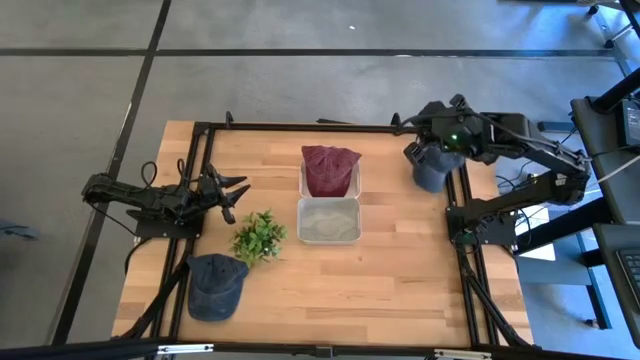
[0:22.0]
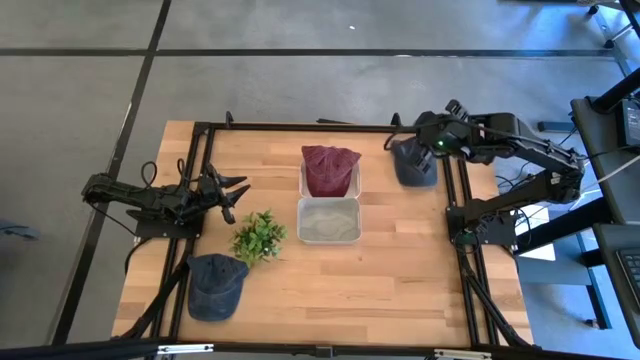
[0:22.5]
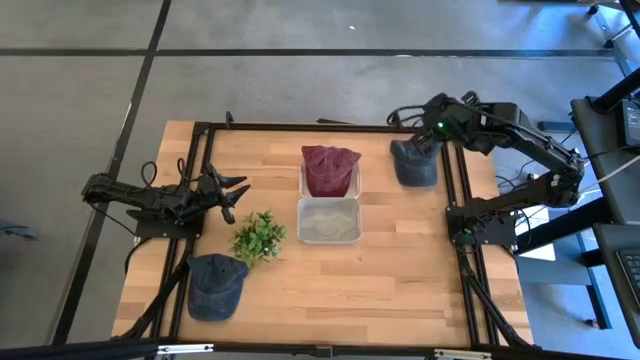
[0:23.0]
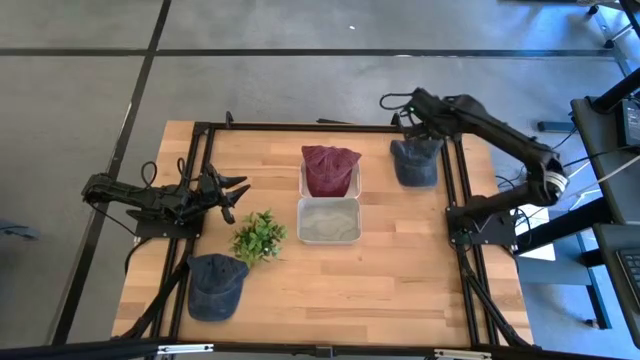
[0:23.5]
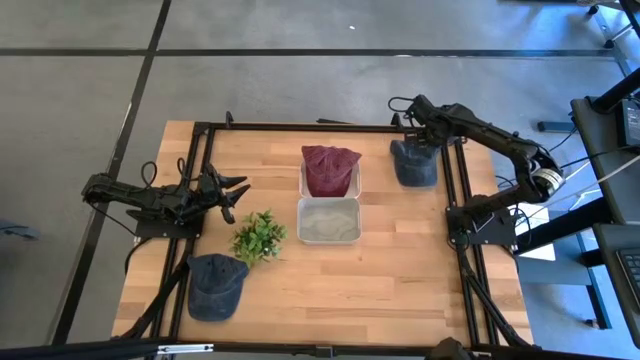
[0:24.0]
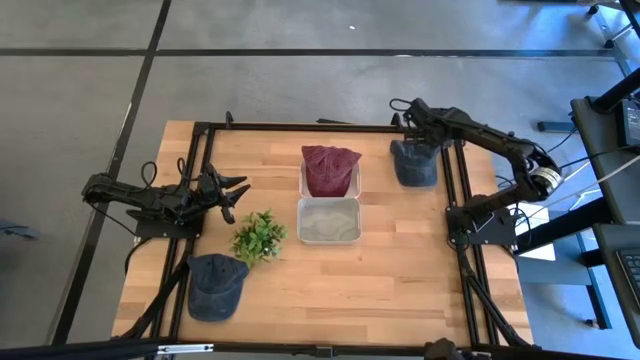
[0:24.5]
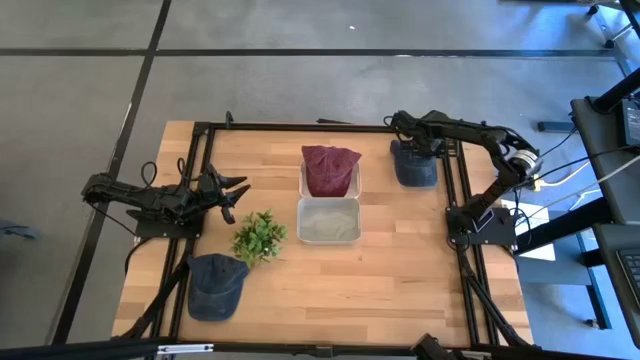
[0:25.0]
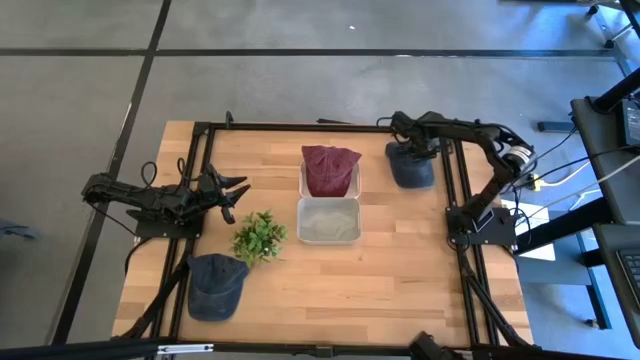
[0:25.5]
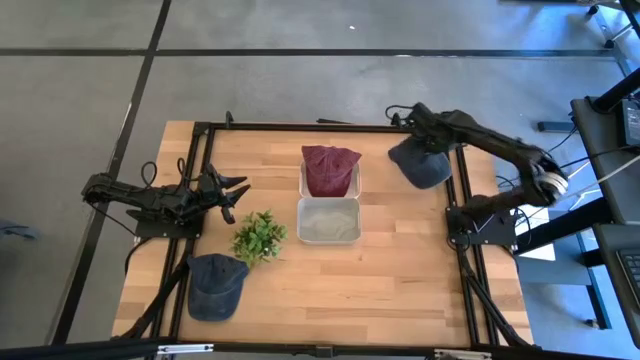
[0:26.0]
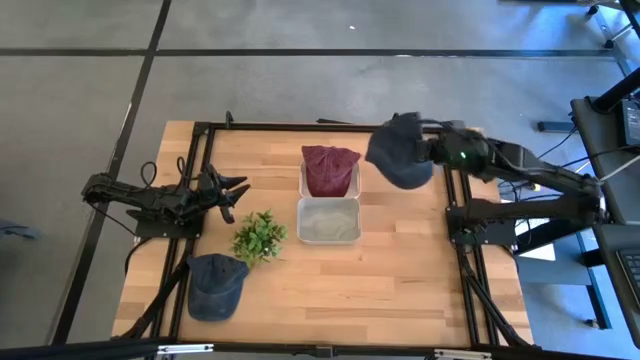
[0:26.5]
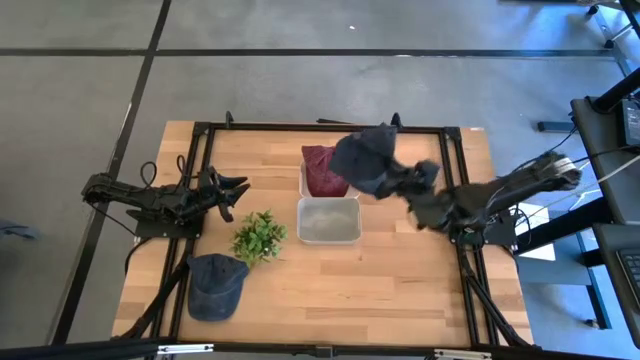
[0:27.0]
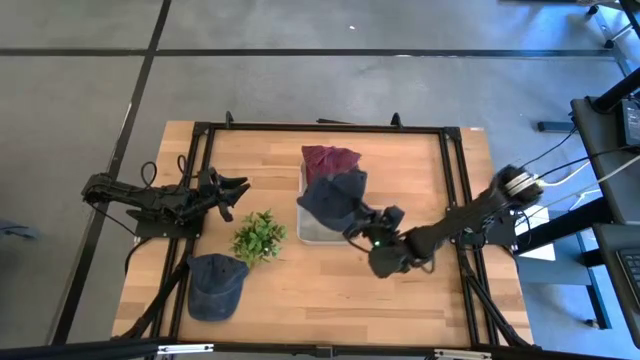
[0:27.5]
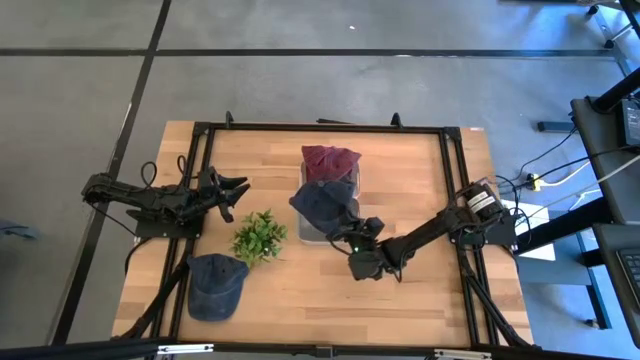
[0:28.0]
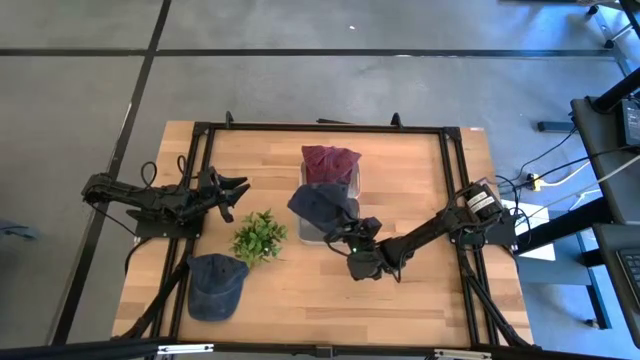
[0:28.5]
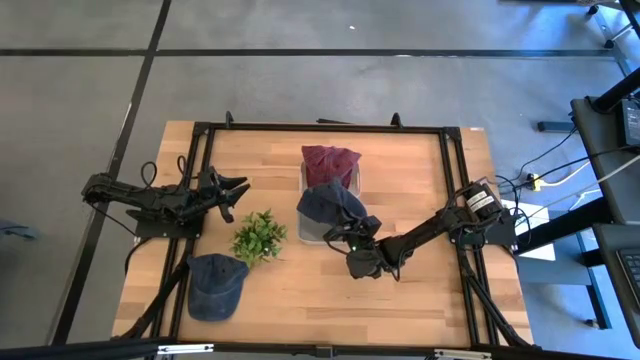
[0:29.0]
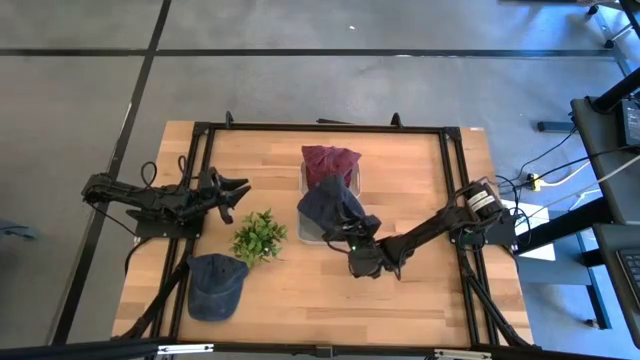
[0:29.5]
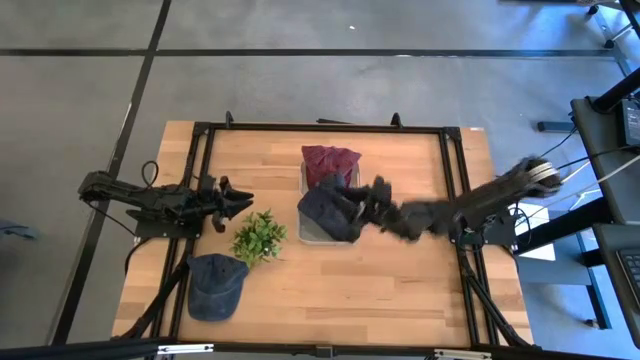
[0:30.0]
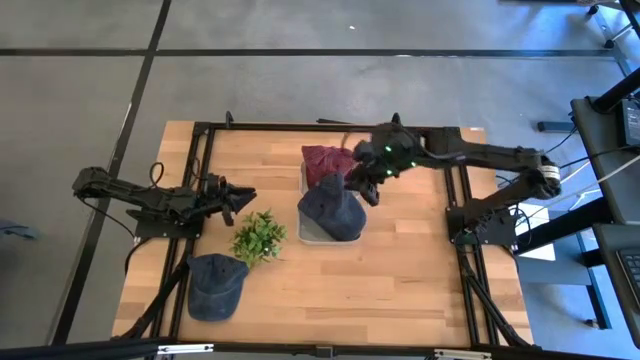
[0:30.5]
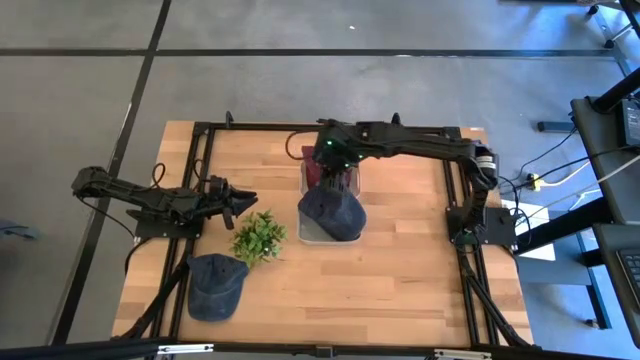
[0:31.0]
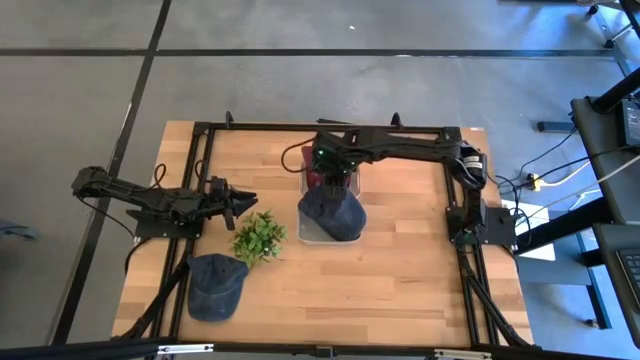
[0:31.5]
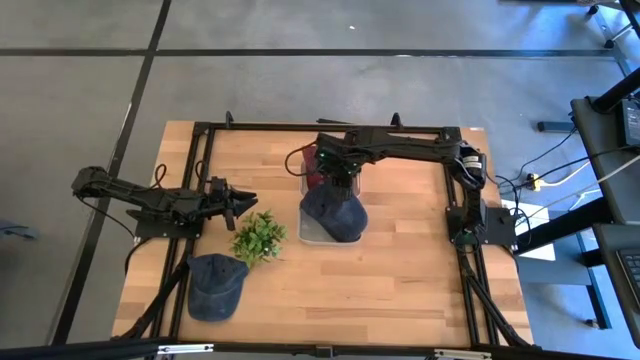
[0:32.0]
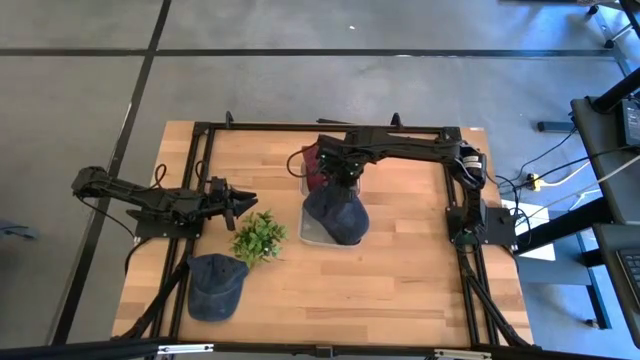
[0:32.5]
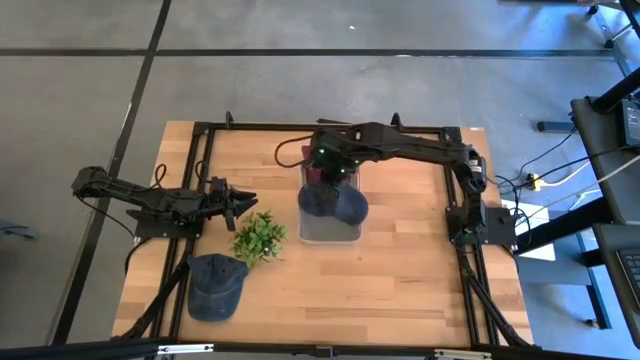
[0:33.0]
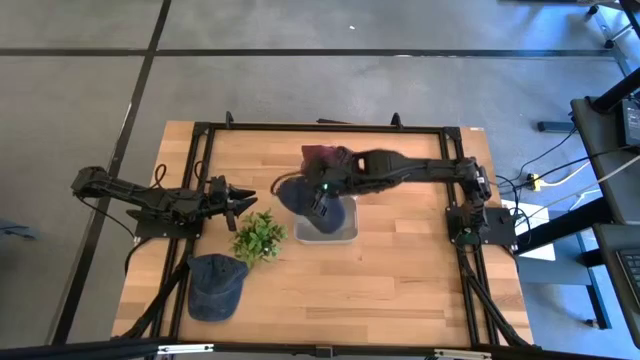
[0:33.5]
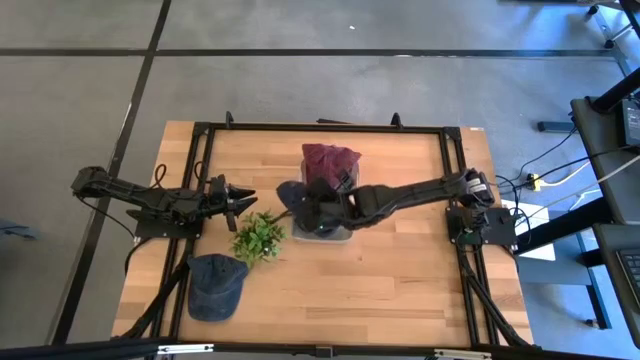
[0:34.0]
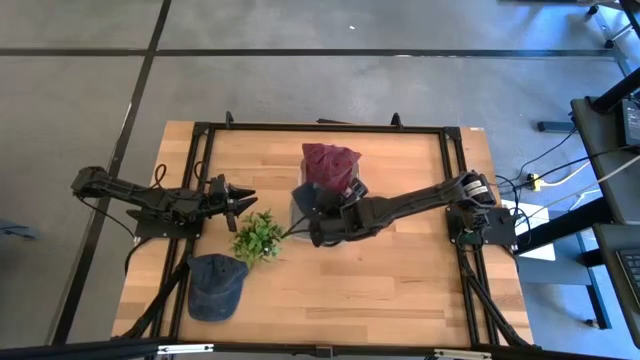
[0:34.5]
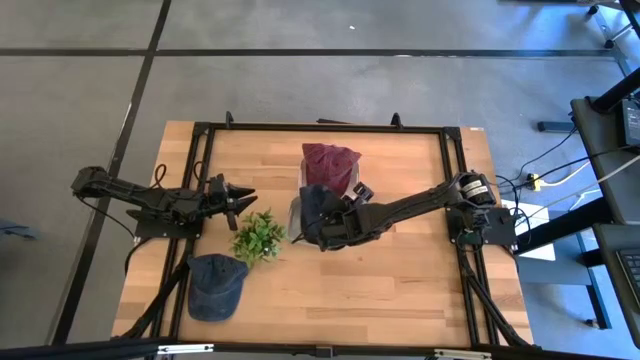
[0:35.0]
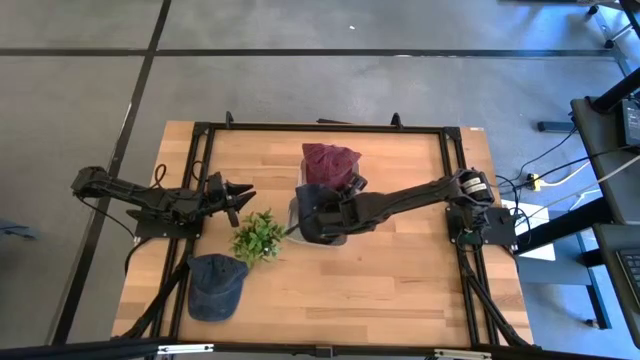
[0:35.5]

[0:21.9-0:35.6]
Task: Pick & Place hat
Put the blue cap into the gray bin

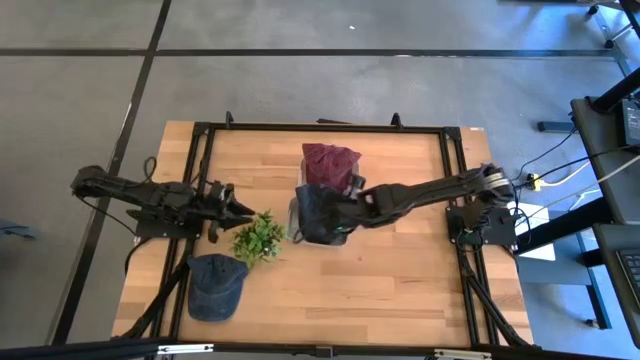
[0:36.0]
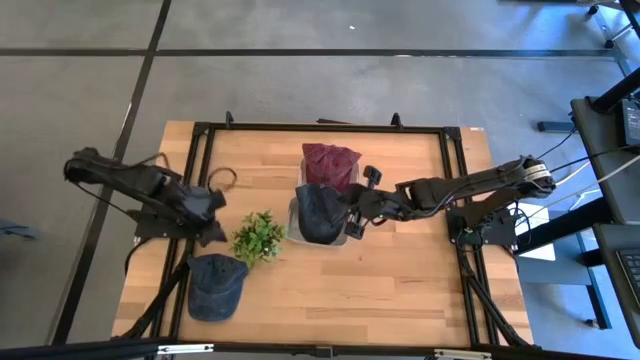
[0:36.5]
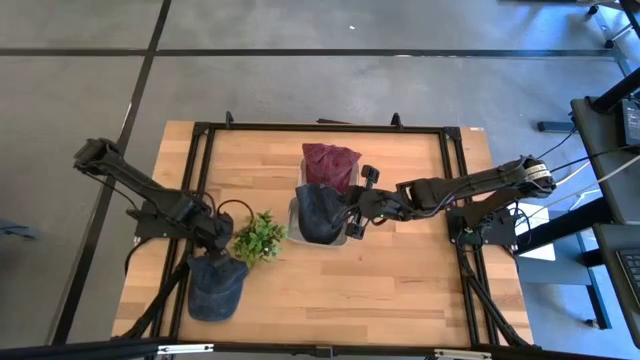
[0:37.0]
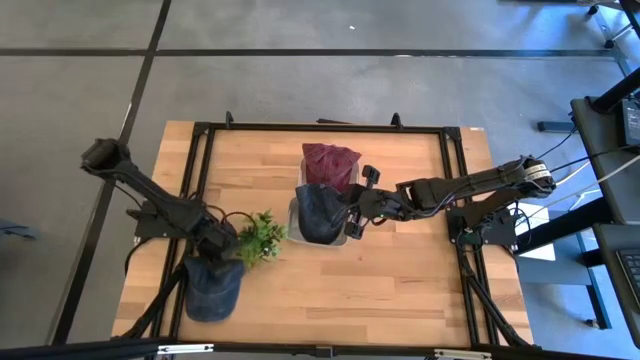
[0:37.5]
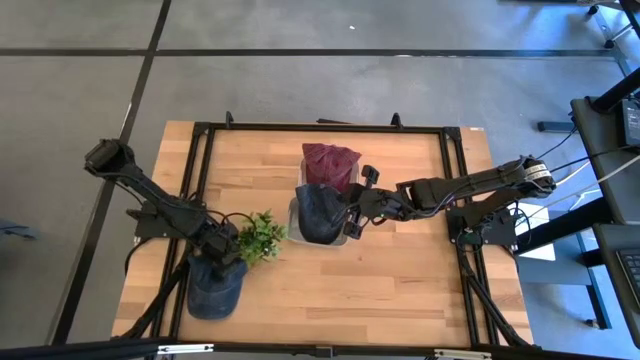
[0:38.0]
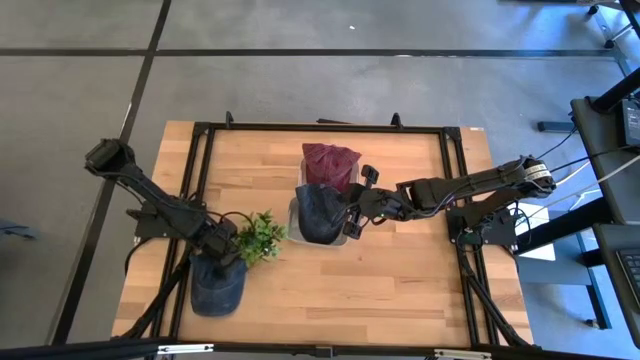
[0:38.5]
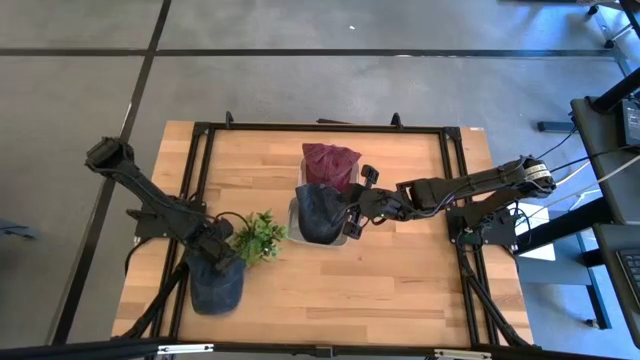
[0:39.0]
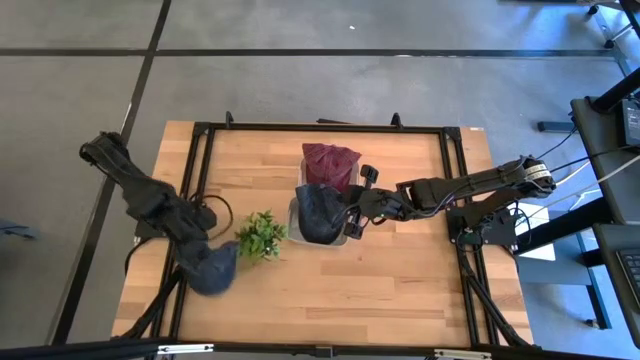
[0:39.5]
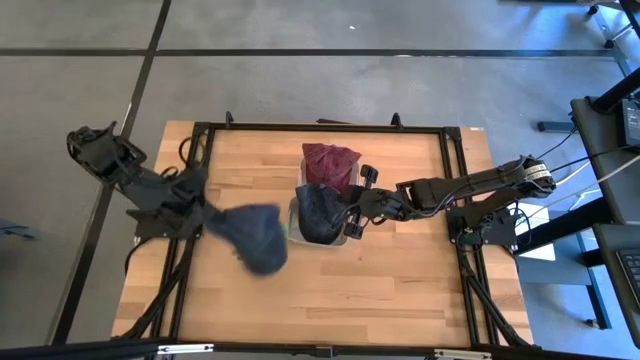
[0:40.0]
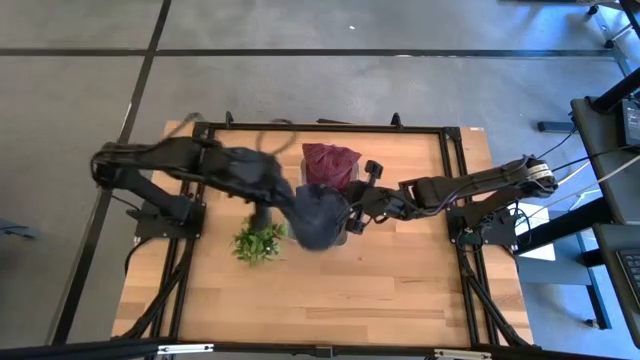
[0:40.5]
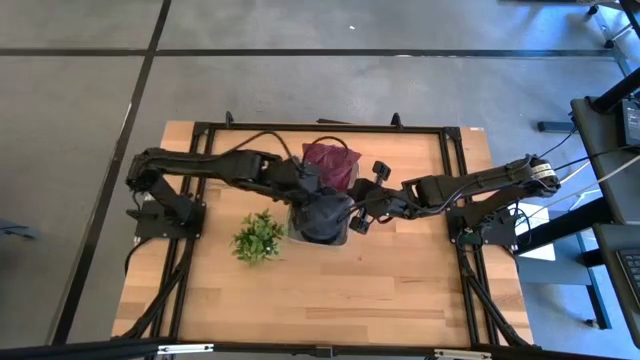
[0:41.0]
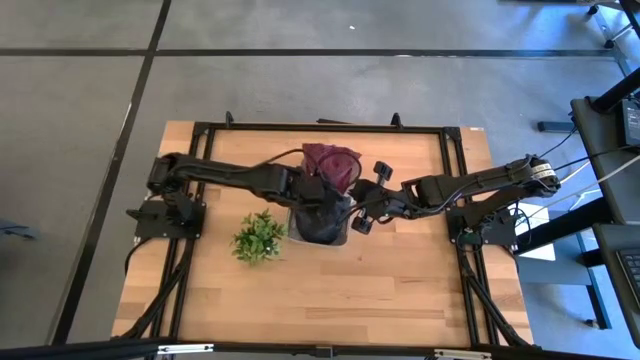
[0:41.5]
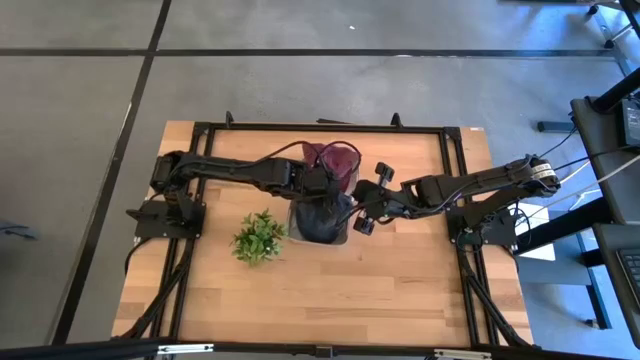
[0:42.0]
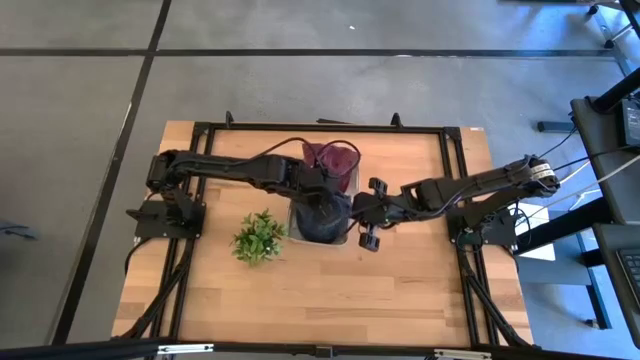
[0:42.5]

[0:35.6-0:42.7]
Put the blue cap into the gray bin

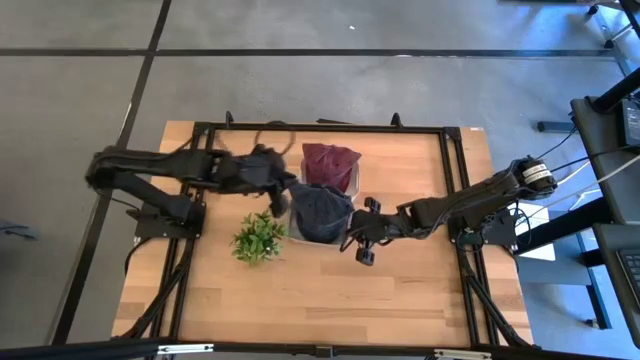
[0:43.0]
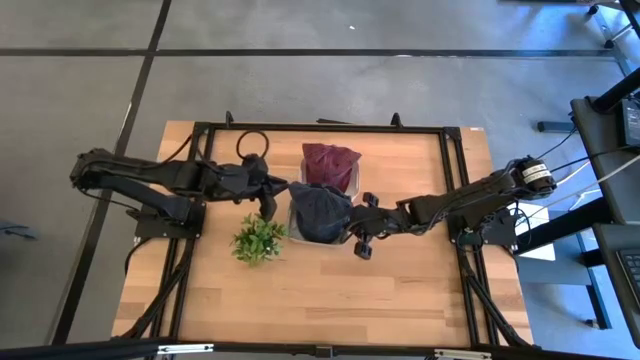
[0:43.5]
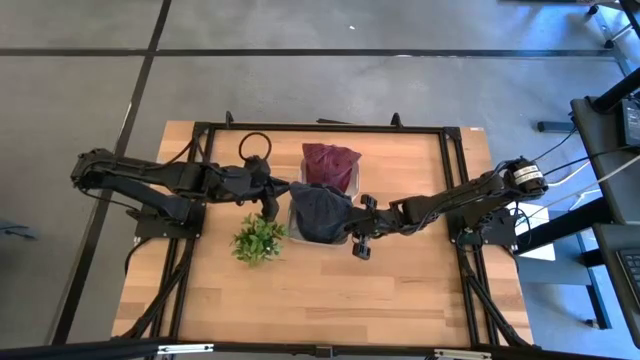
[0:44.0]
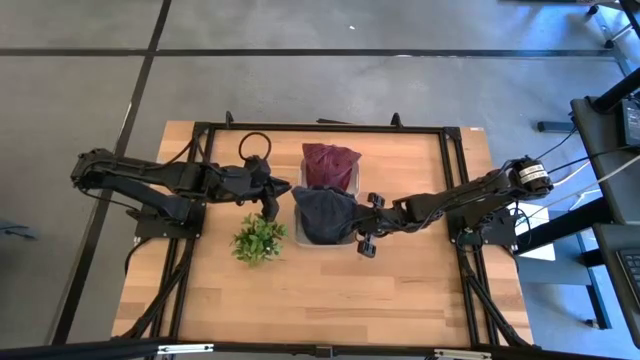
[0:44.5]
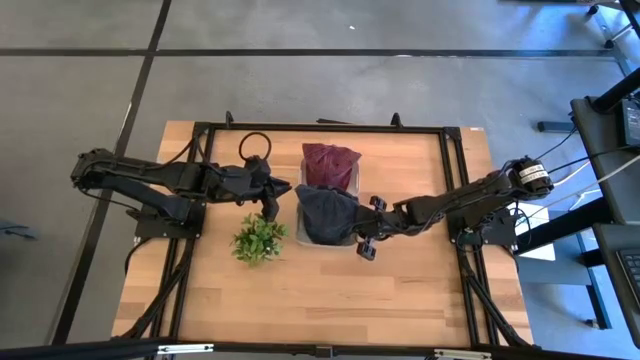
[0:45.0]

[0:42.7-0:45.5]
Adjust the gray bin
